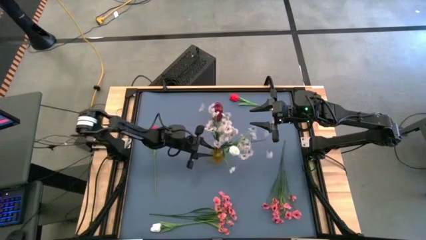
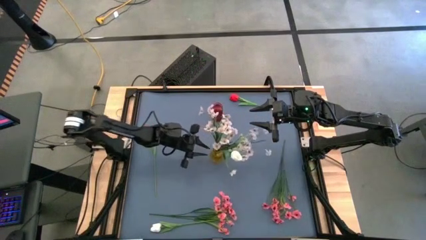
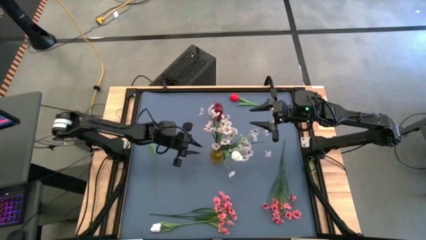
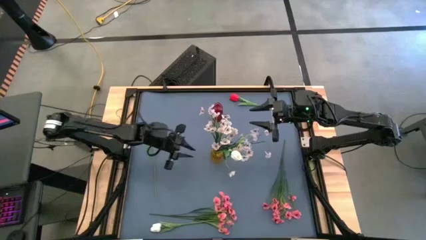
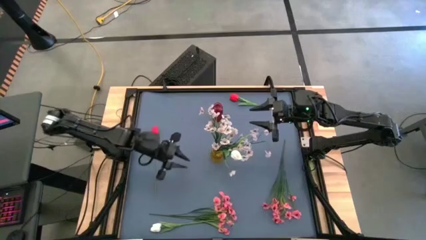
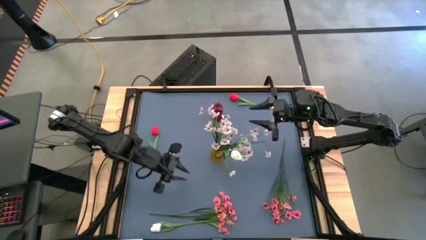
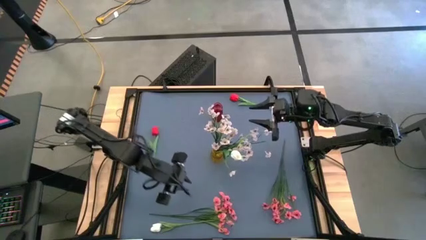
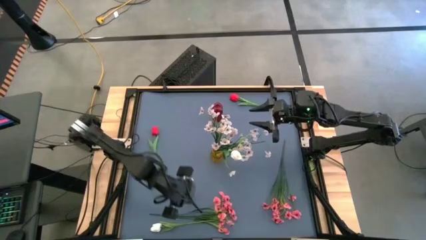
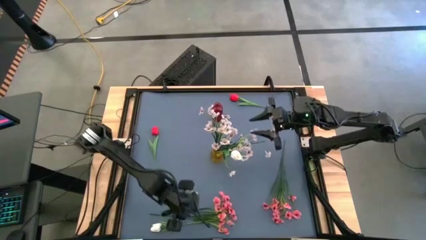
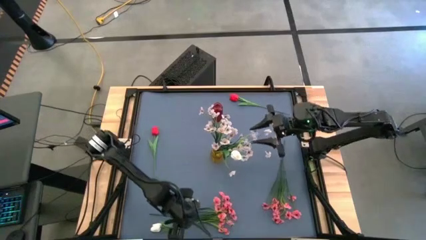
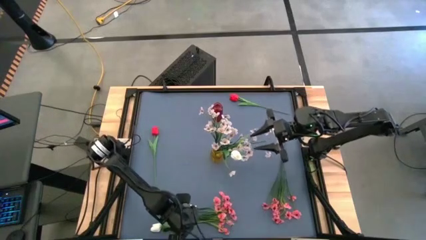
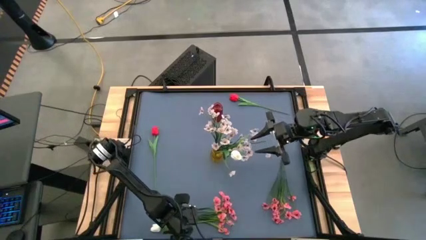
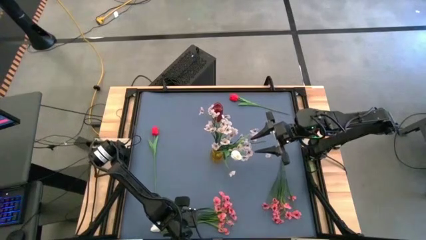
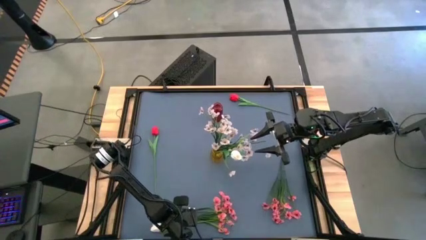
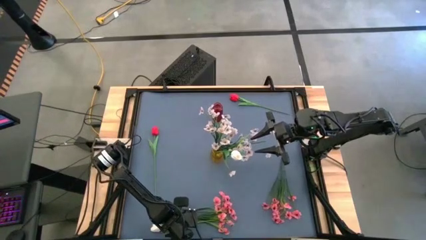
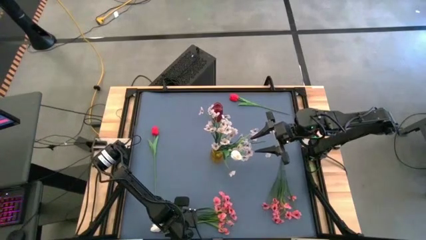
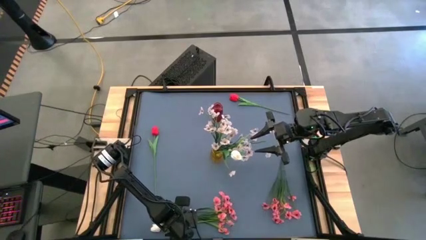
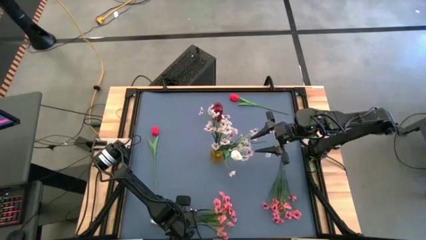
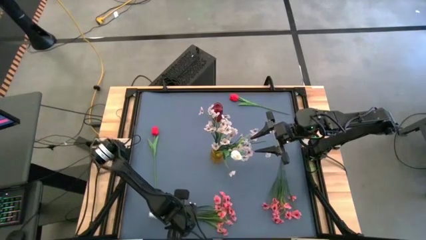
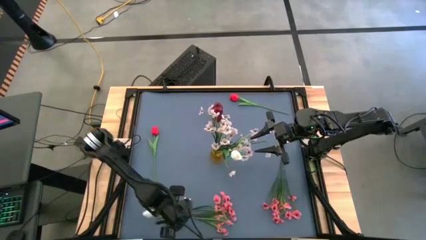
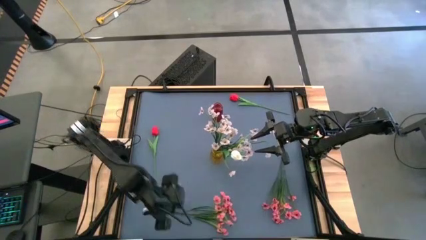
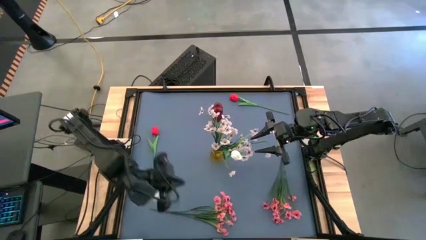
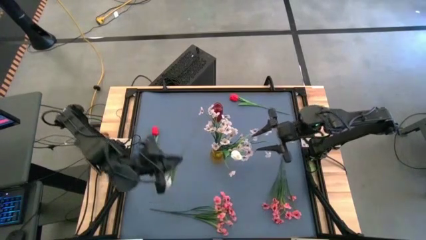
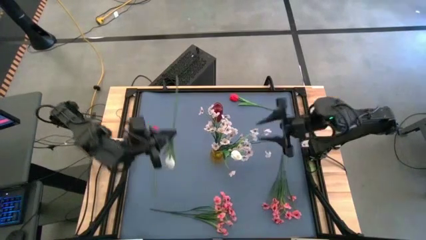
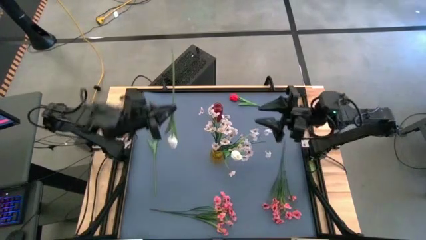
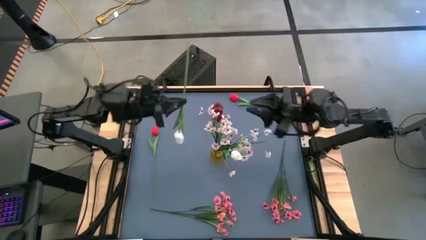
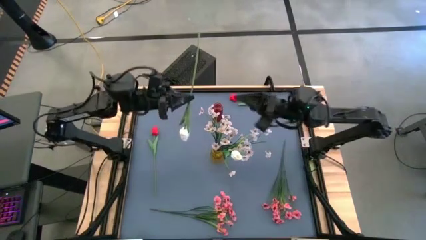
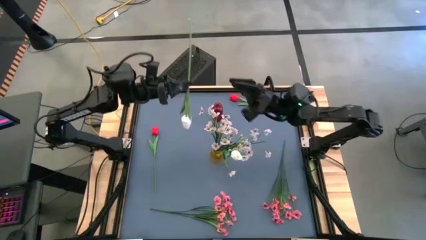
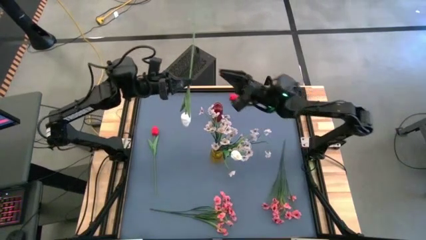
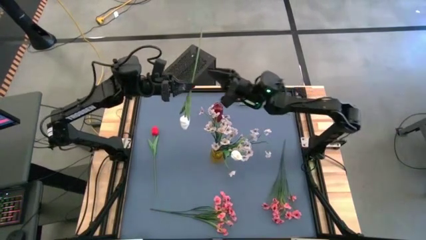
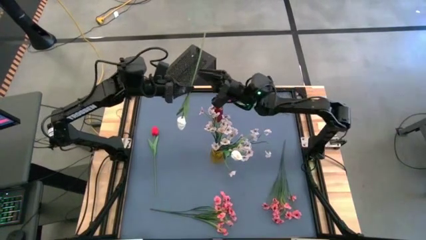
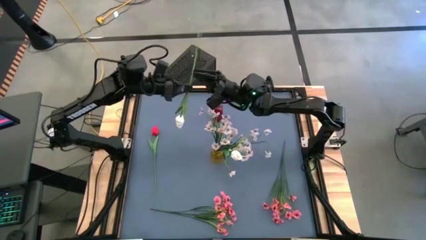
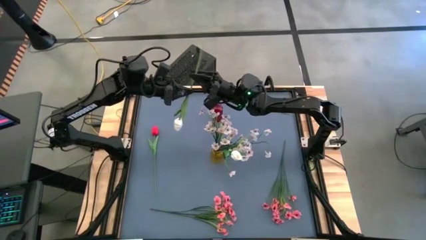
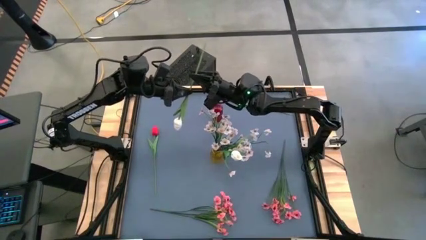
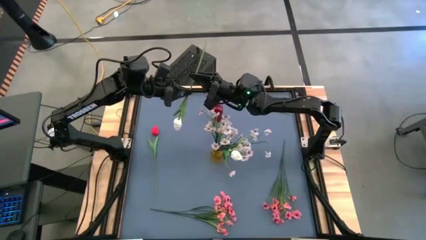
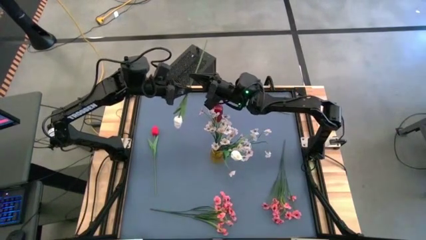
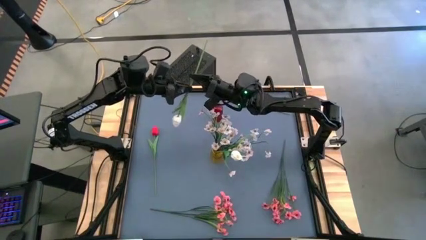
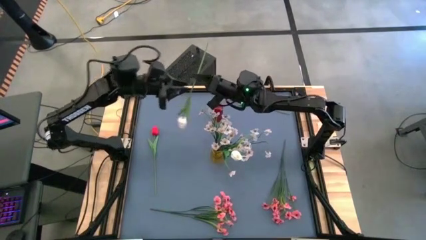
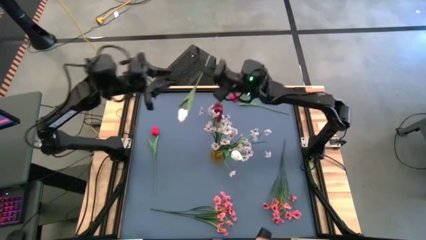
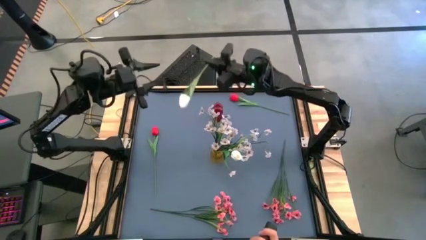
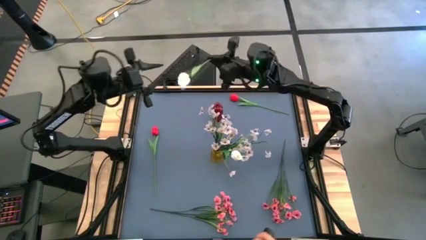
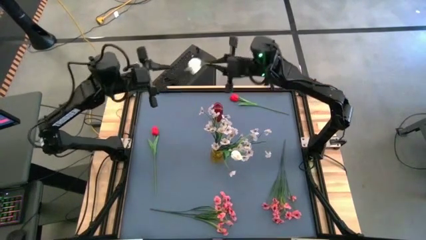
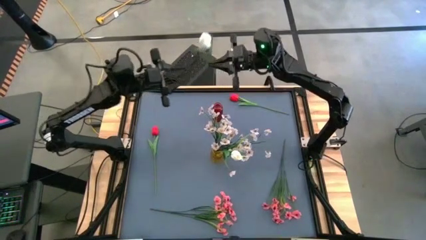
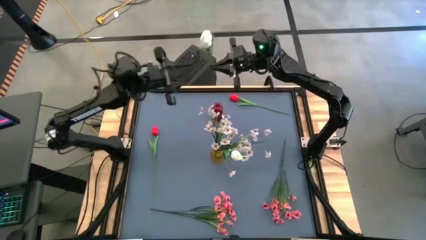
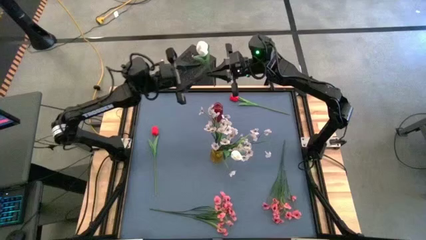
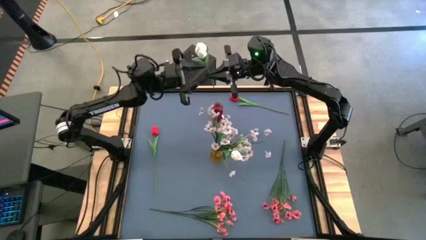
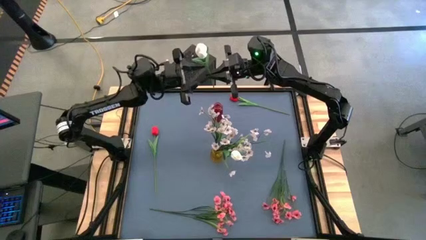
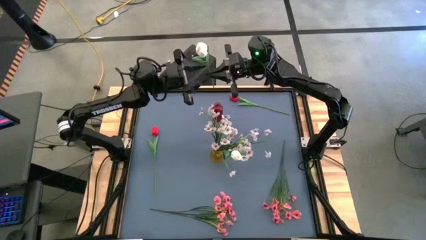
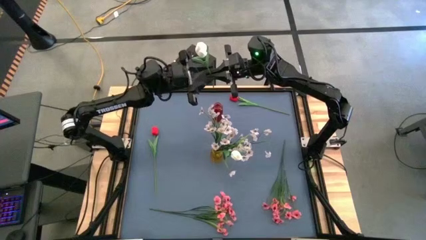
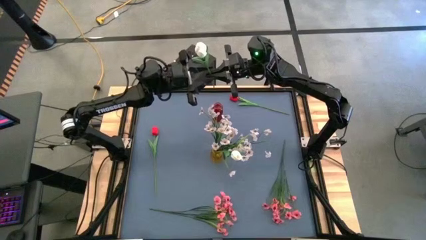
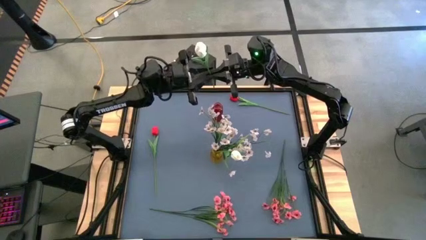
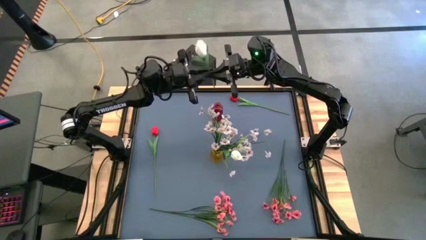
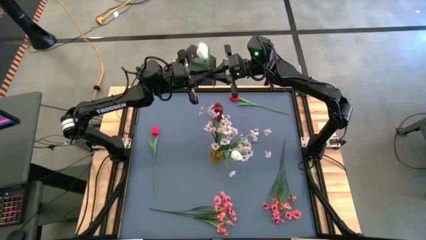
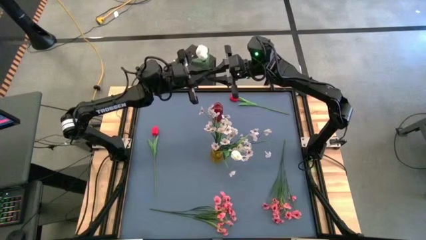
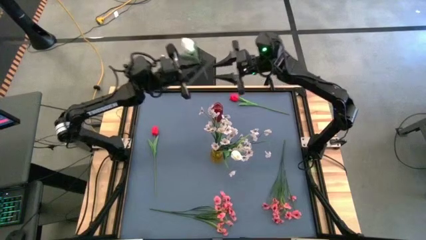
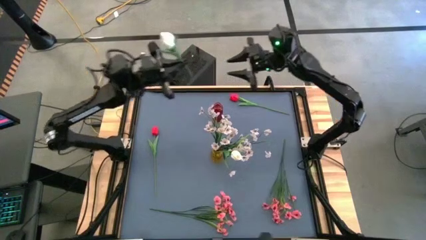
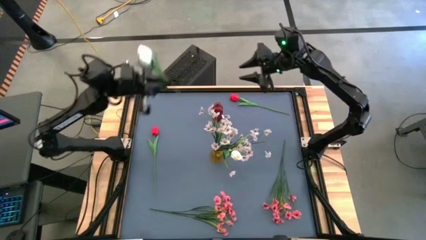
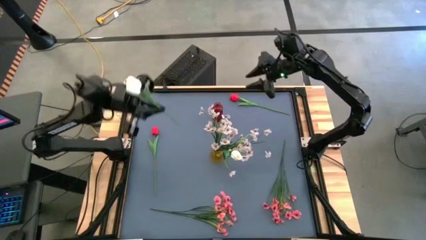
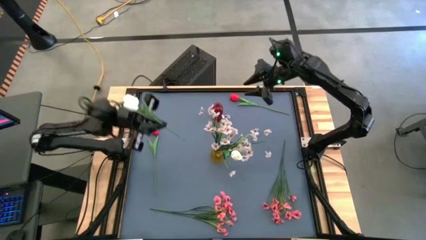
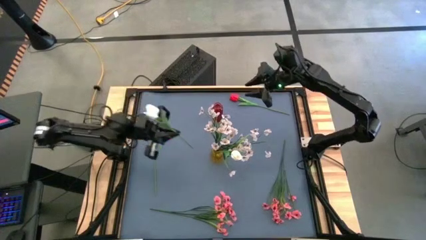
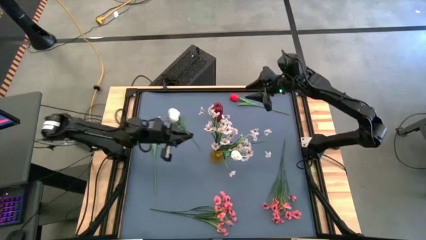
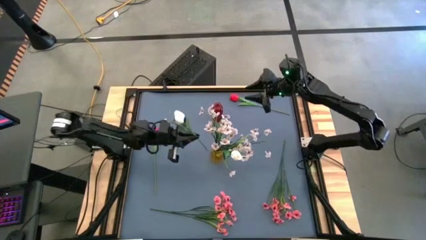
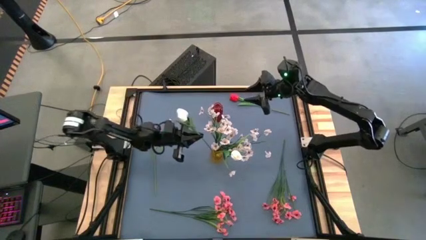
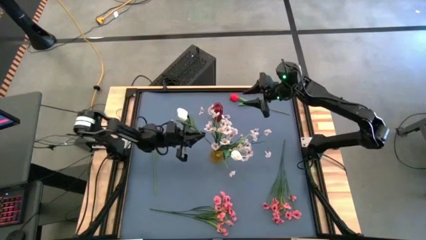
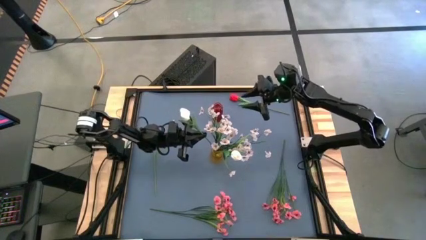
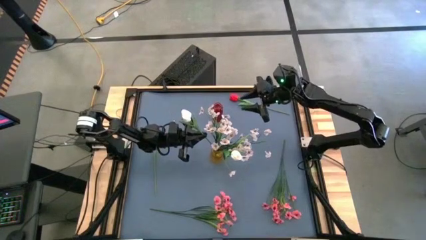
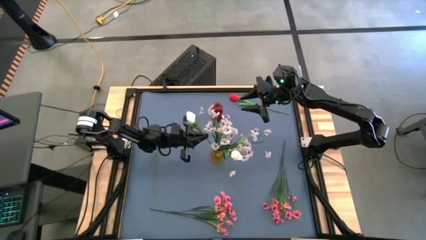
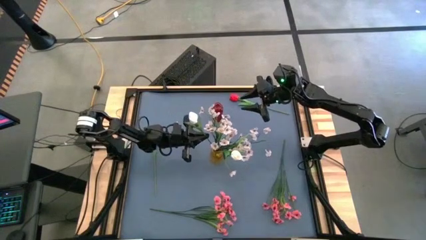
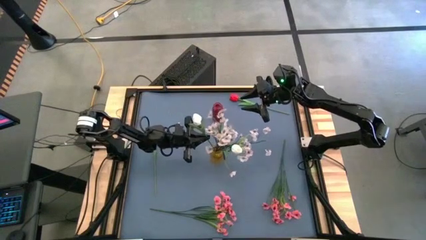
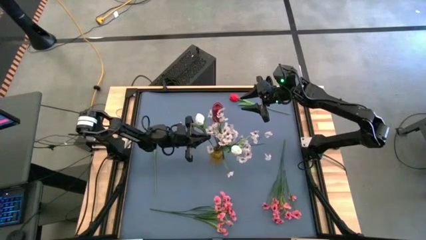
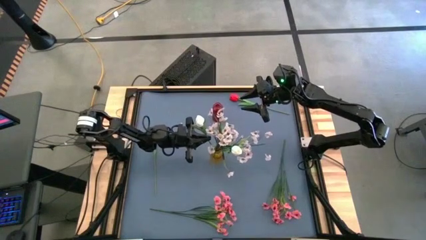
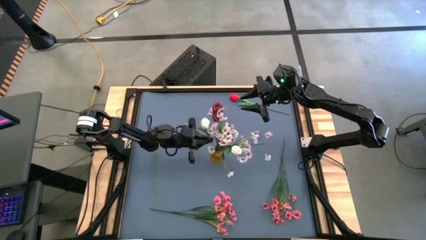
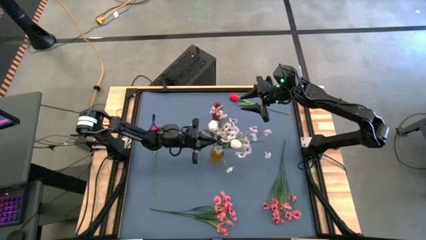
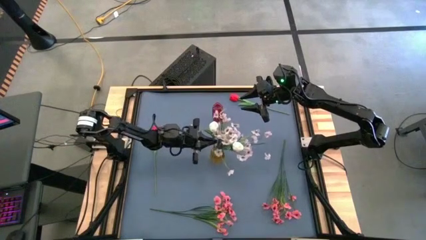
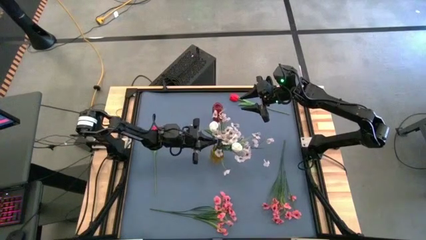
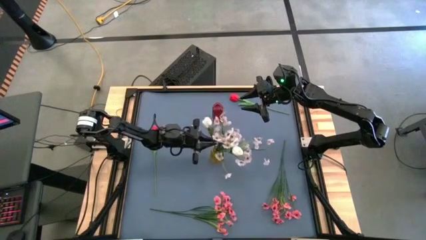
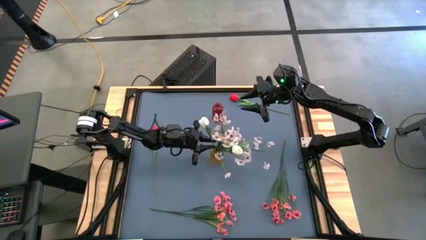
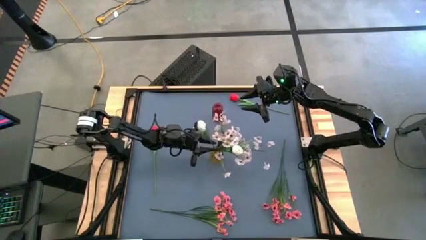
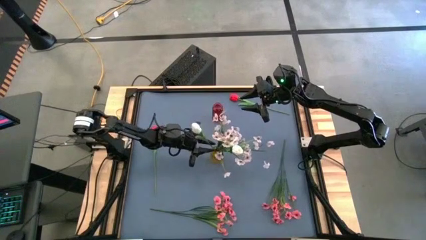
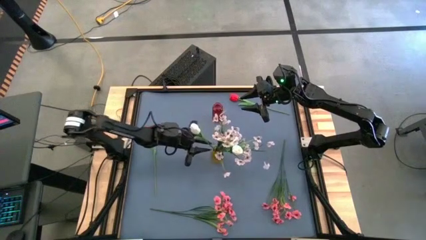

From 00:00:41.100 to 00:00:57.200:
Task: Sort flowers into vase by color
Put the white flower into the yellow flower vase
